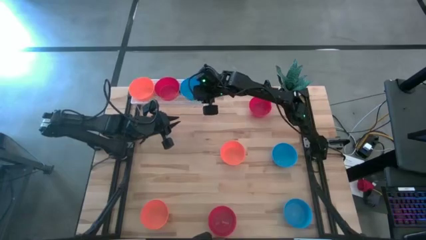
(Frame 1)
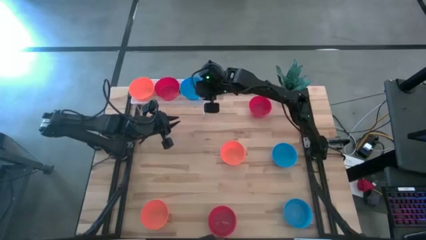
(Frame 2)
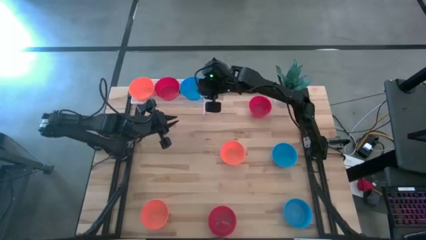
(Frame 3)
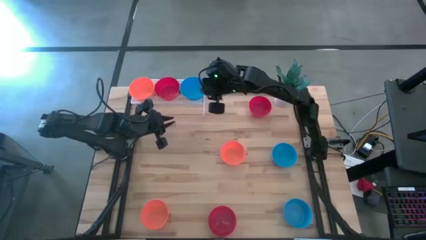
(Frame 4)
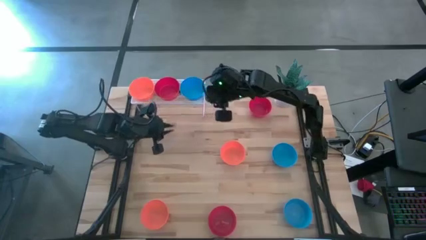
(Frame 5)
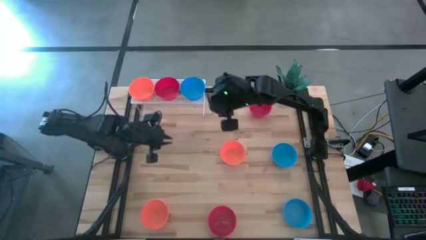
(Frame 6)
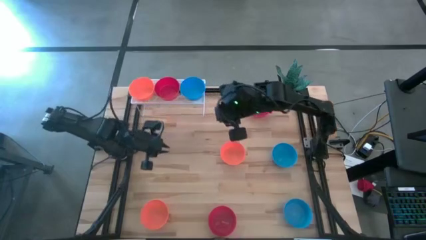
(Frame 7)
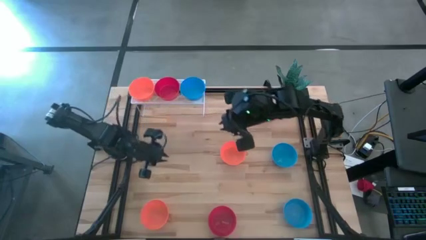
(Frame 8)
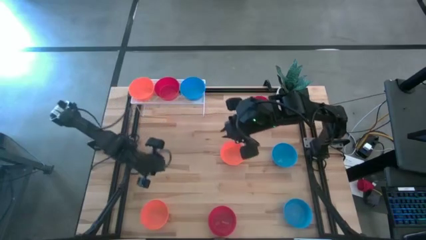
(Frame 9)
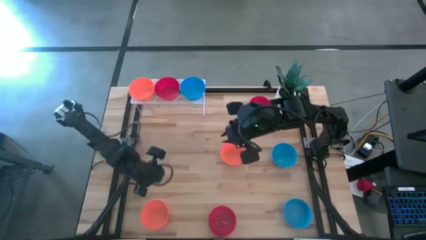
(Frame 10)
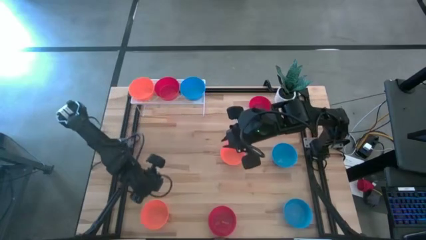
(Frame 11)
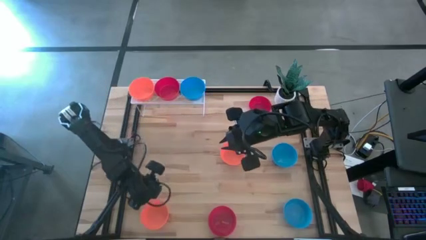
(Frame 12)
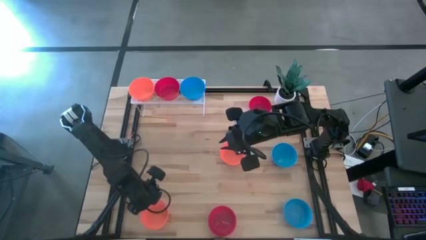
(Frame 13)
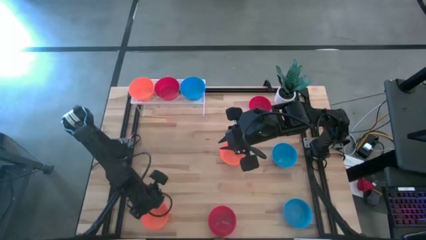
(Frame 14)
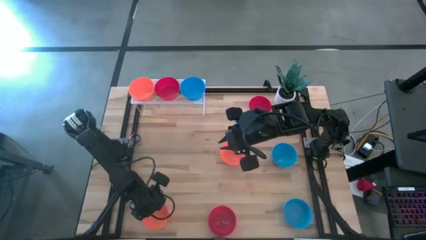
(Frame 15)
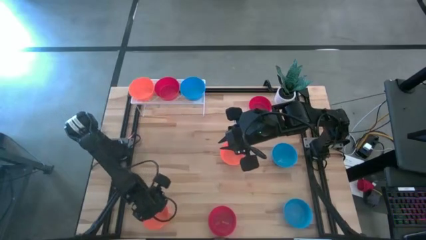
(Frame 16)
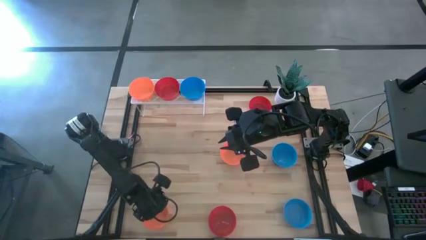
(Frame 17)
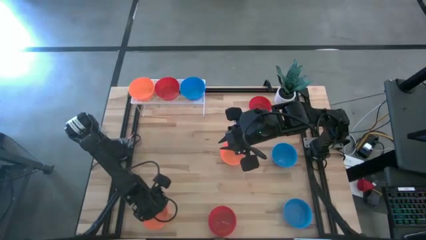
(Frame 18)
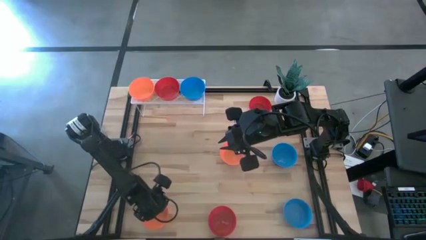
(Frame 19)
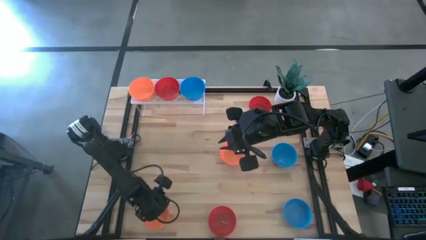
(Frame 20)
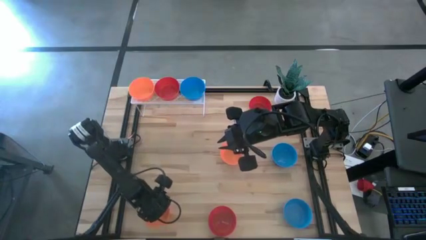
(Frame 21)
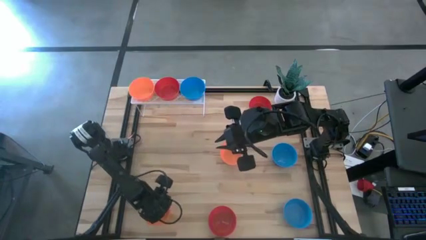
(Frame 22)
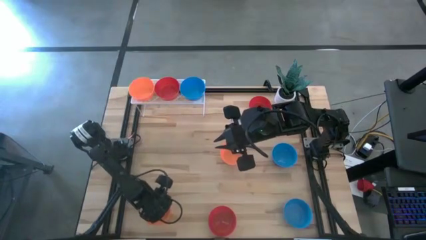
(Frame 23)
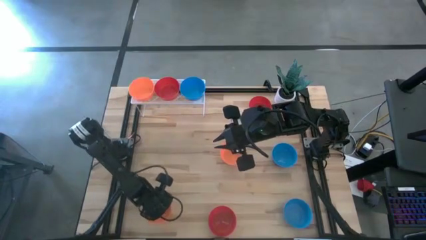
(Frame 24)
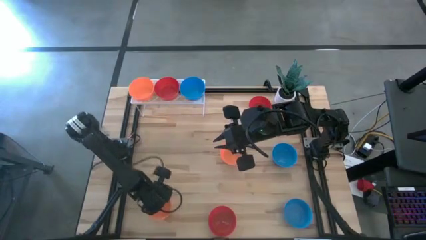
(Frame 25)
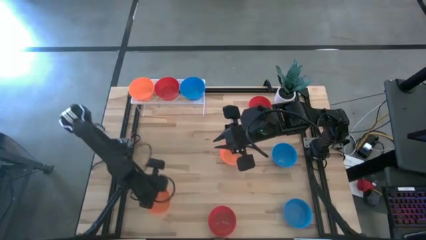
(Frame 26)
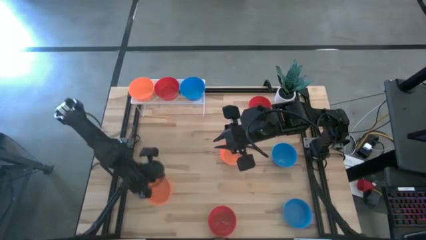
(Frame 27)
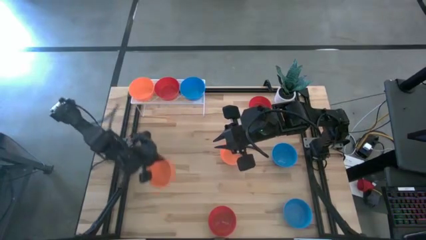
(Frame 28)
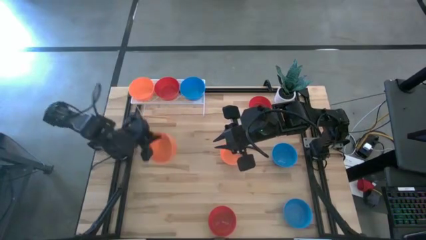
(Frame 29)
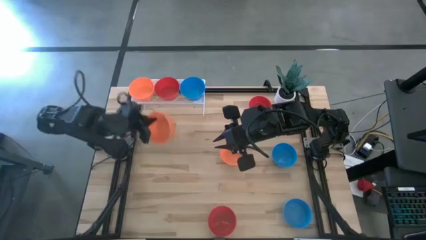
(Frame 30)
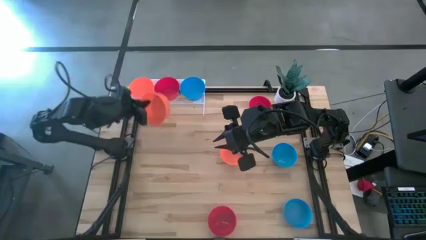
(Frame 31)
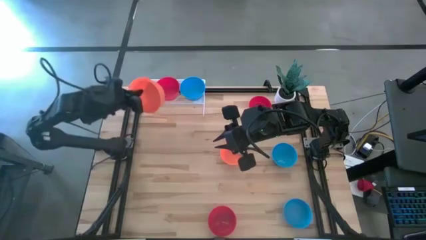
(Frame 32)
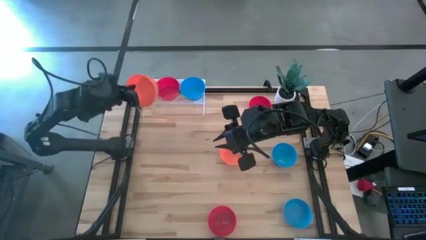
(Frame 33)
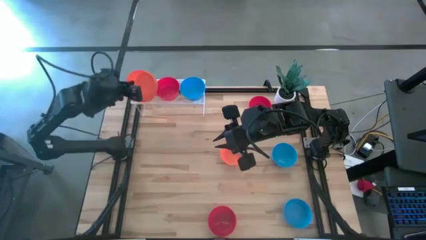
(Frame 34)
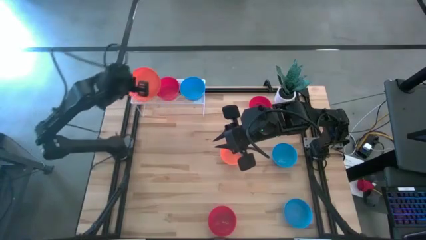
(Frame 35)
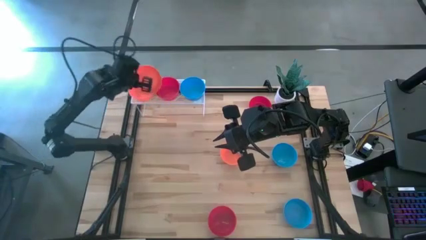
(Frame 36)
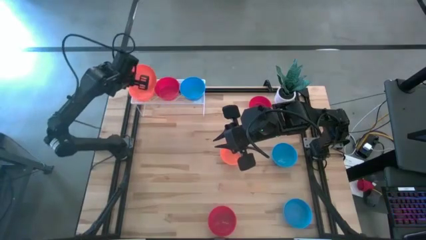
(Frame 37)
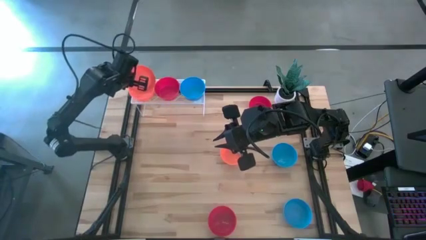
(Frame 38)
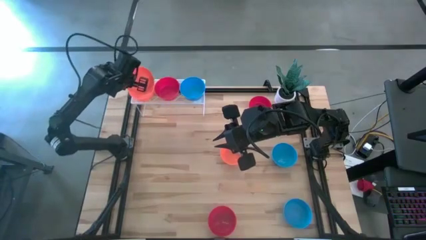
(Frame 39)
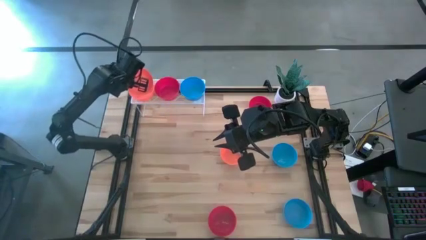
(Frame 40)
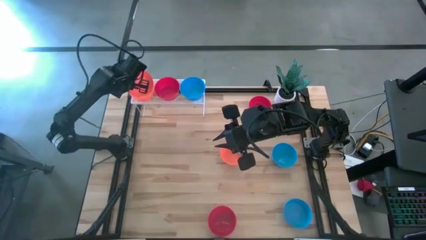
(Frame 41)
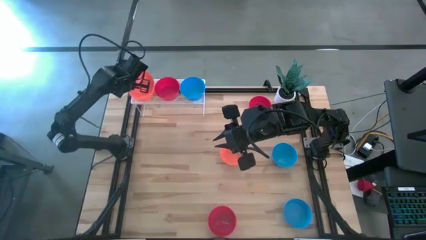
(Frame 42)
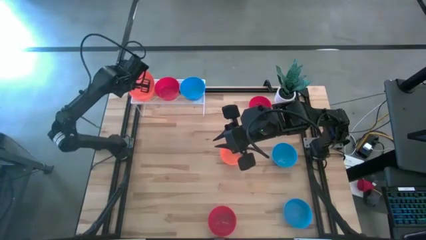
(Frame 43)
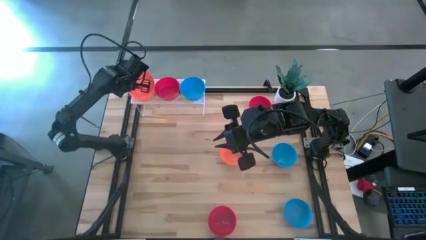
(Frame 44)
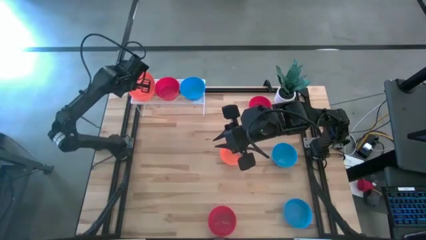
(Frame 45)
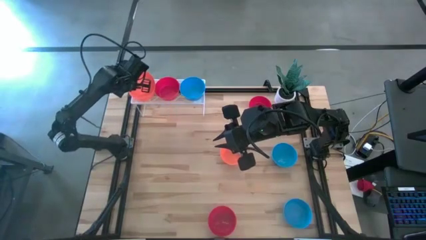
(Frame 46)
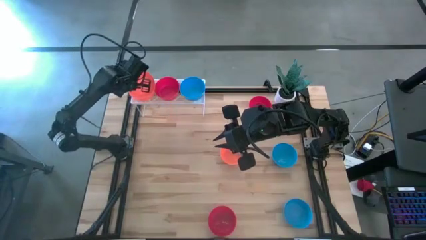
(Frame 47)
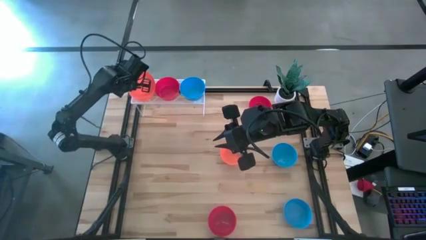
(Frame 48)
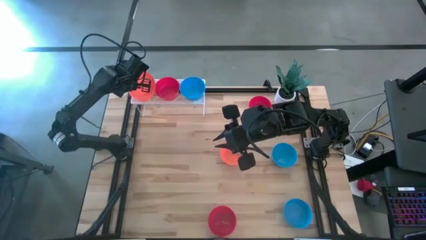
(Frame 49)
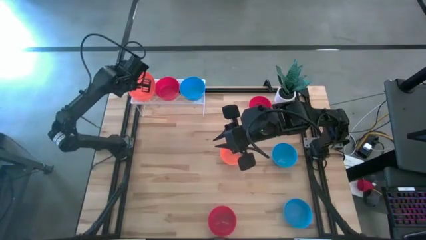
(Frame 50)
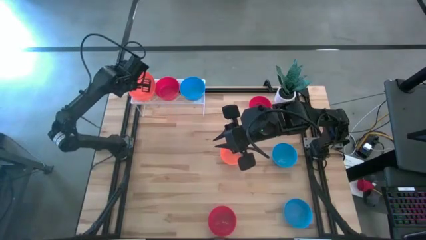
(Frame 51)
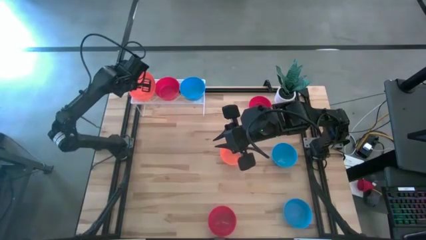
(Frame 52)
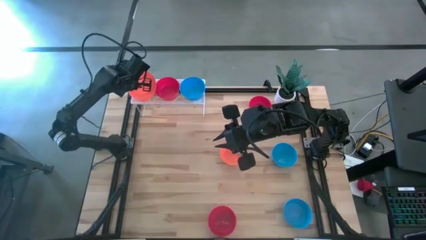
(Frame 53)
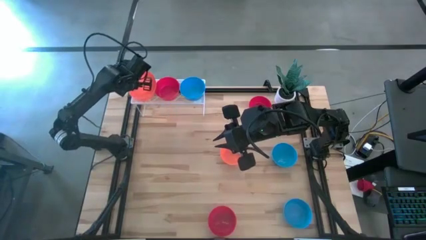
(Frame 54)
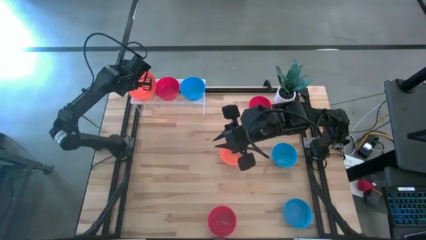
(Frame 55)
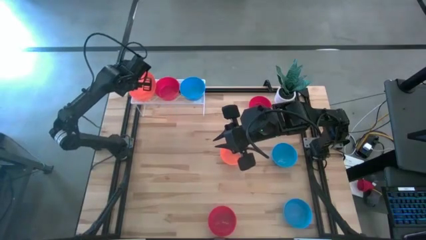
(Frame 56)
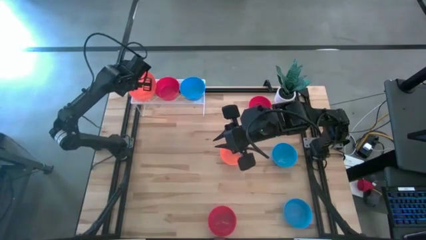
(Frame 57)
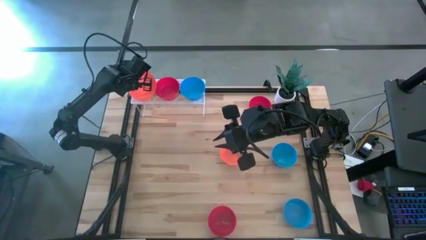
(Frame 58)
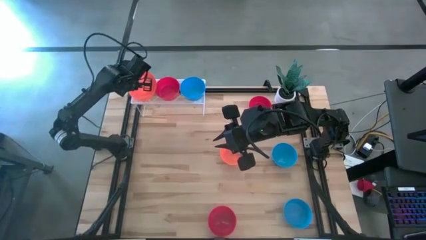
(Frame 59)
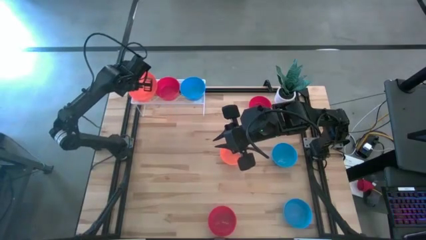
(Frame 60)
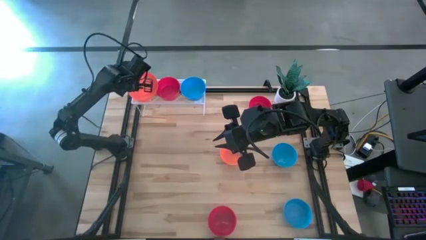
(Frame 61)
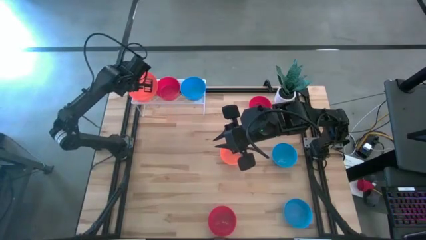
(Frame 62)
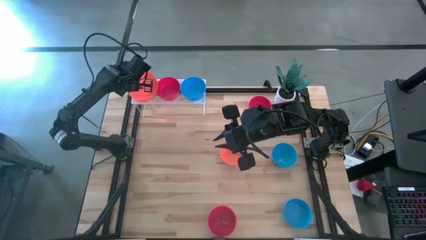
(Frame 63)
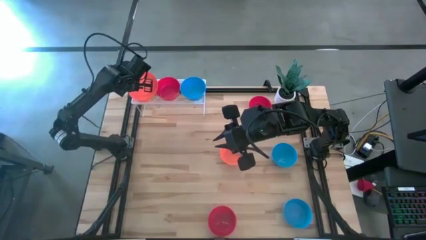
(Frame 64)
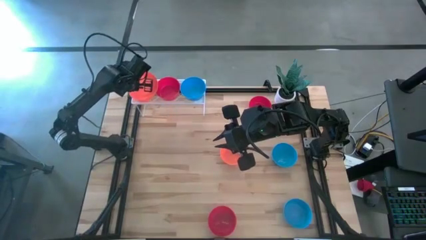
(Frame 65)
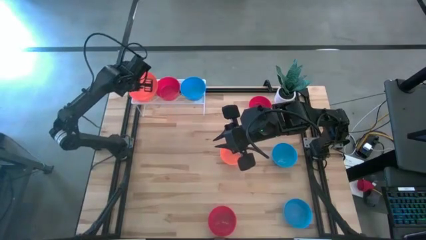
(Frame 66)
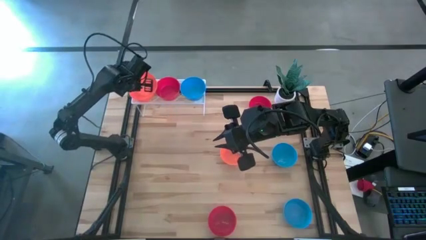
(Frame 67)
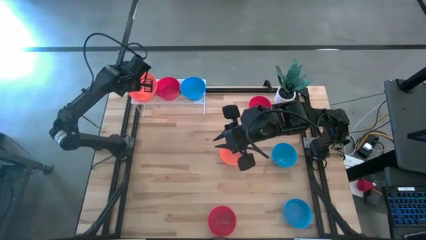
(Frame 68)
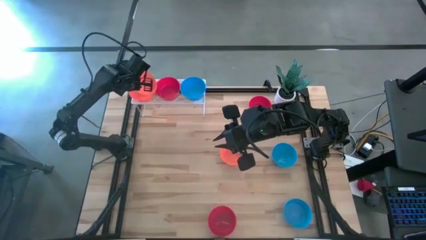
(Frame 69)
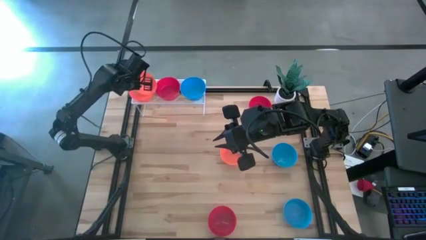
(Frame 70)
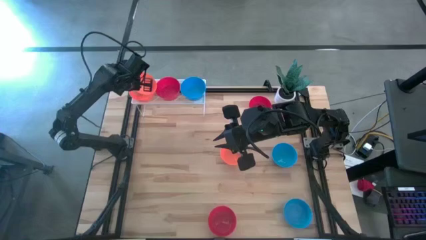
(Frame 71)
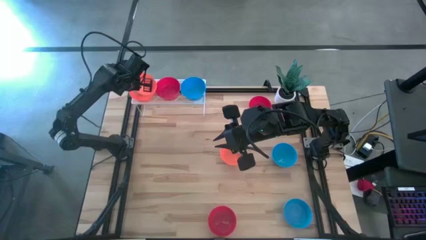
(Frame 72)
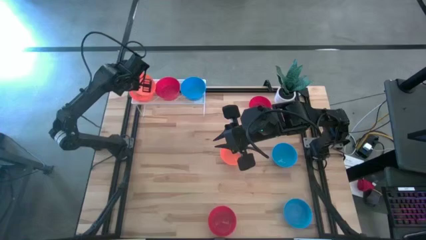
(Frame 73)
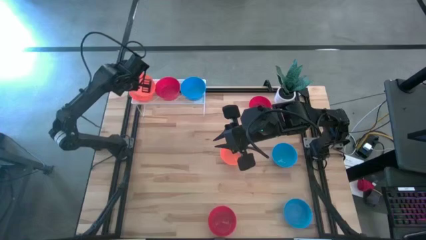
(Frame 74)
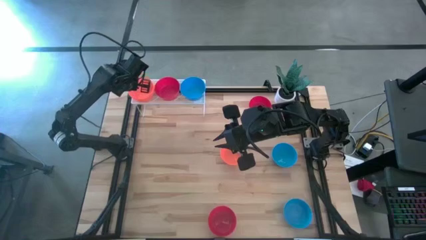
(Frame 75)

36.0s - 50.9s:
Task: Pick & Place Mini bowls
Stack the bottom orange bowl on top of the orange bowl on the shelf

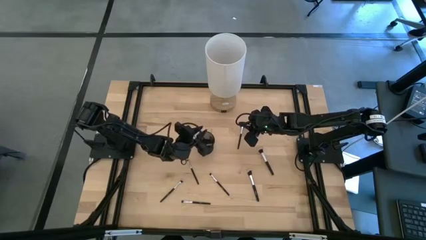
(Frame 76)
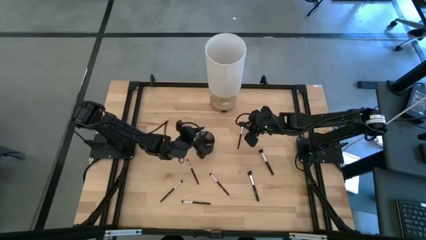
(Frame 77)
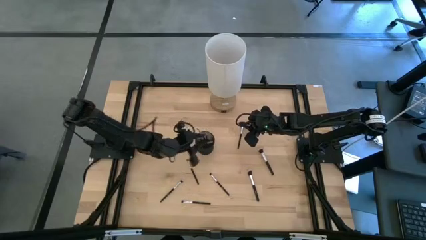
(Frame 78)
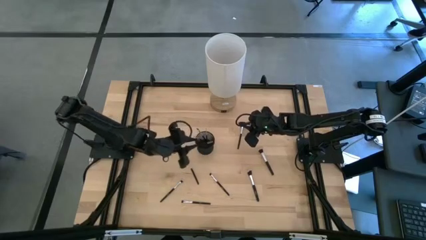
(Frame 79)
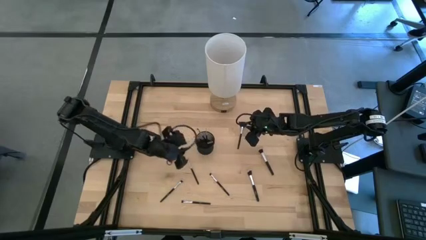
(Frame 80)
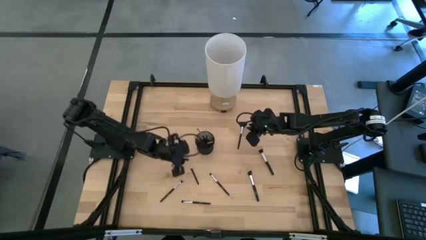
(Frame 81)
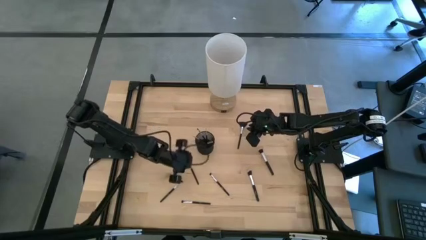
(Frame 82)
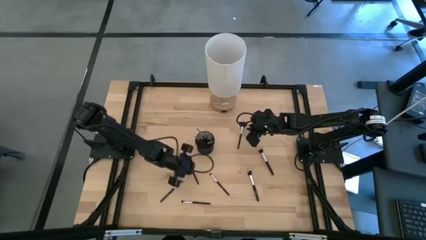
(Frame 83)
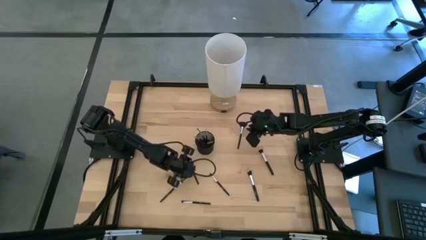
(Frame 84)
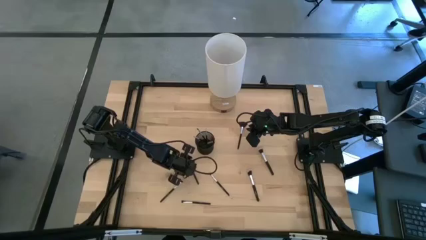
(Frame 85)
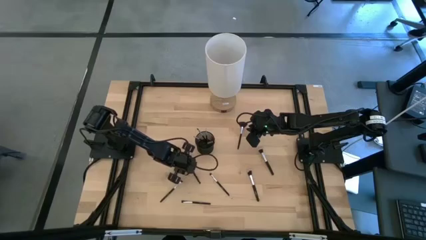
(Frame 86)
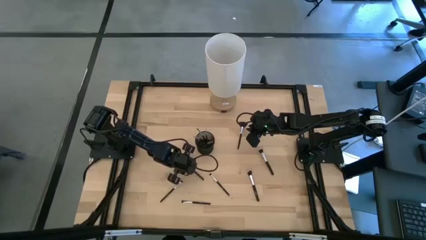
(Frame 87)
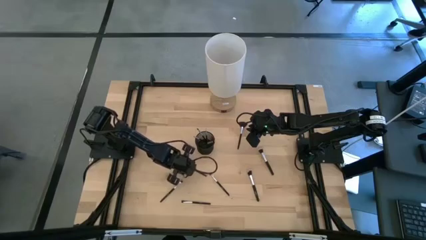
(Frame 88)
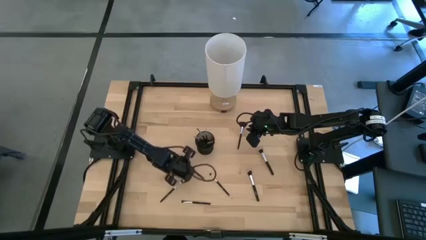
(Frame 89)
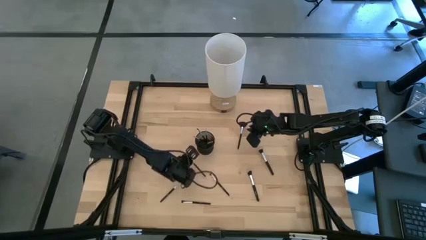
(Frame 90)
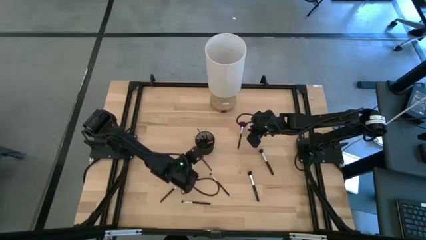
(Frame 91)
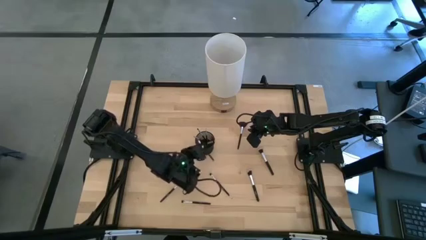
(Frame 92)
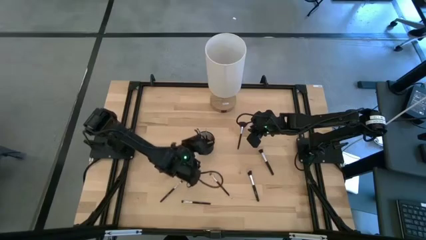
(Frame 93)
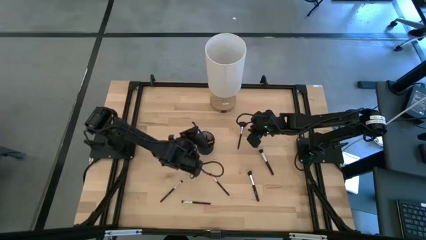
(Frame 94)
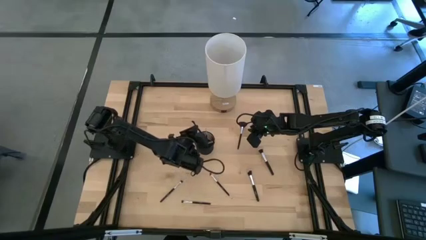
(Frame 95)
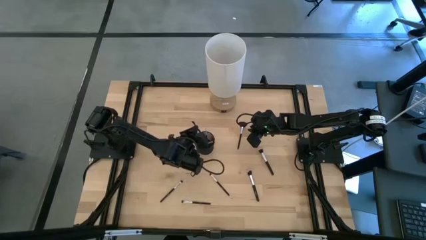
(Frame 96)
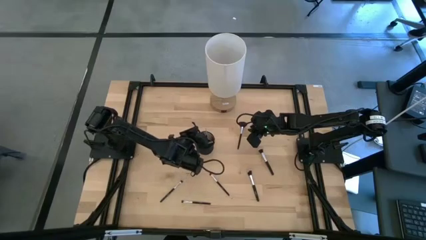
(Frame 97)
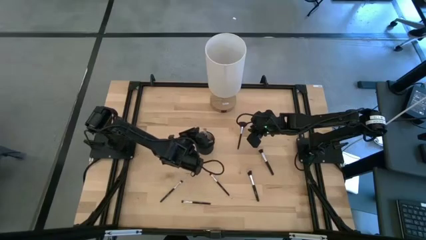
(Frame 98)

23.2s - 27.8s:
Task: Put items in baskets/containers
Put the eyeshadow brush into the holder
